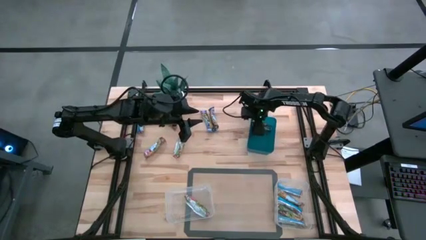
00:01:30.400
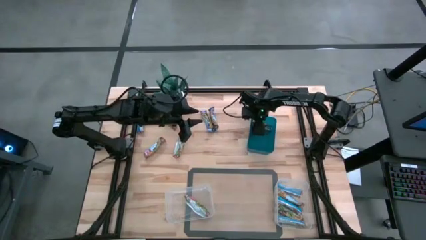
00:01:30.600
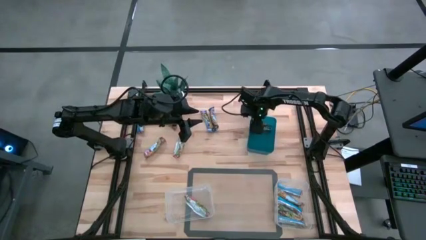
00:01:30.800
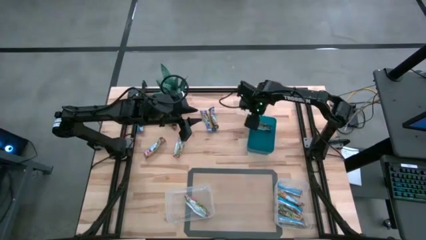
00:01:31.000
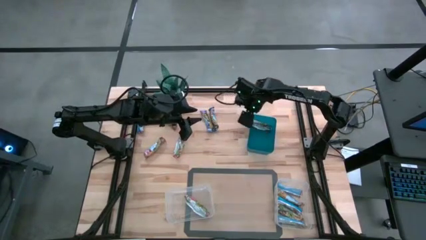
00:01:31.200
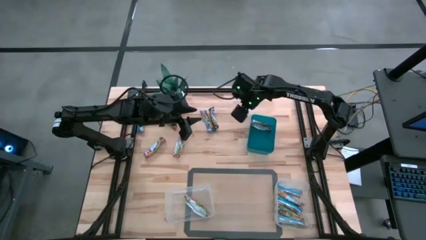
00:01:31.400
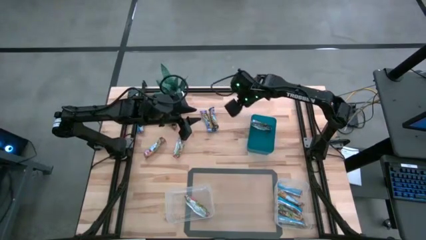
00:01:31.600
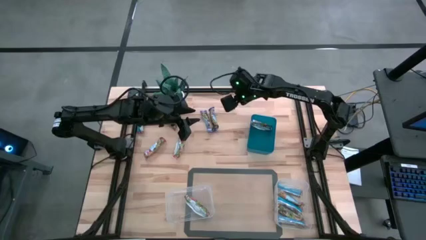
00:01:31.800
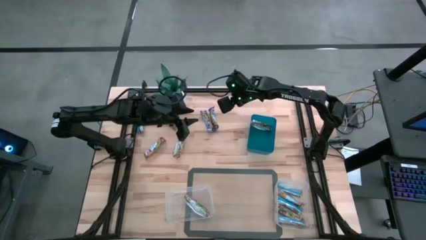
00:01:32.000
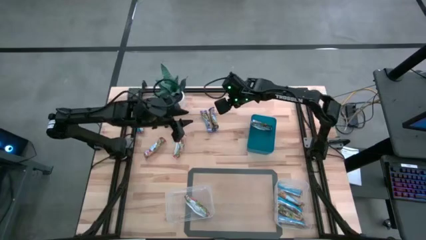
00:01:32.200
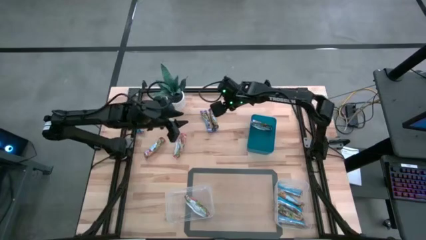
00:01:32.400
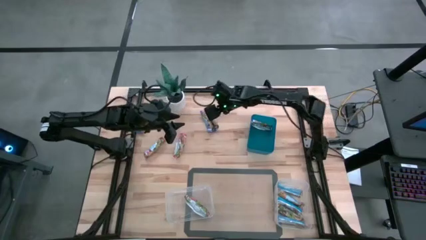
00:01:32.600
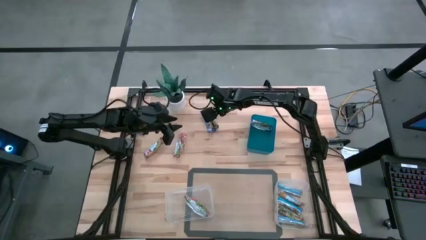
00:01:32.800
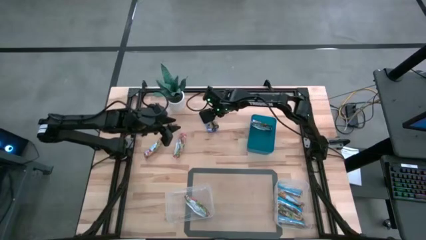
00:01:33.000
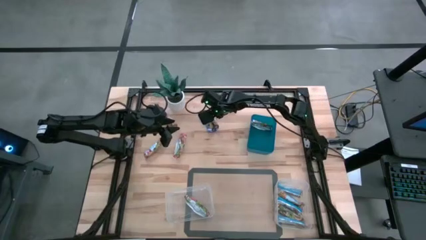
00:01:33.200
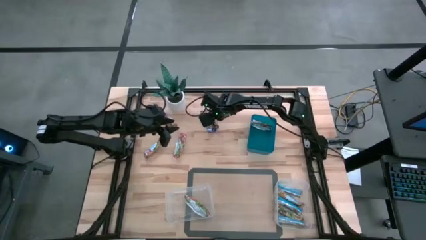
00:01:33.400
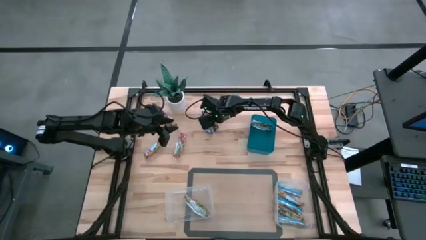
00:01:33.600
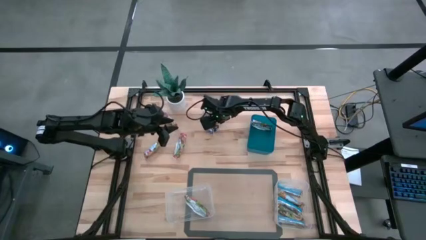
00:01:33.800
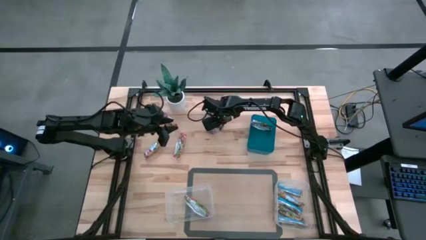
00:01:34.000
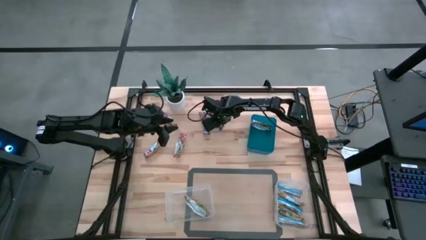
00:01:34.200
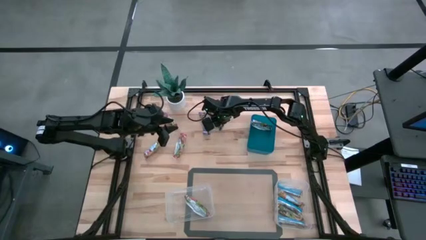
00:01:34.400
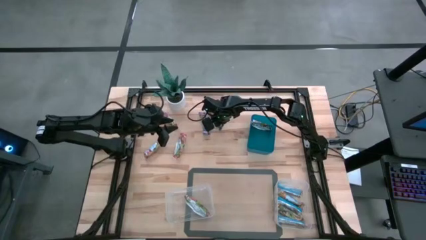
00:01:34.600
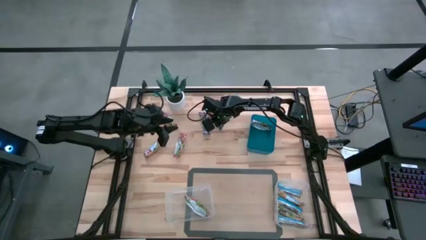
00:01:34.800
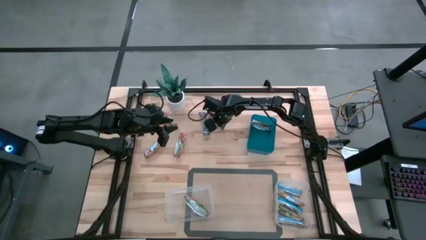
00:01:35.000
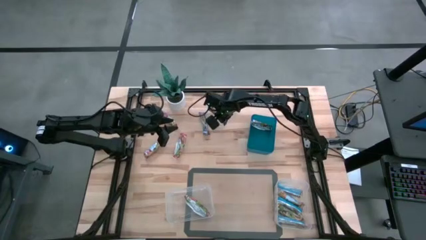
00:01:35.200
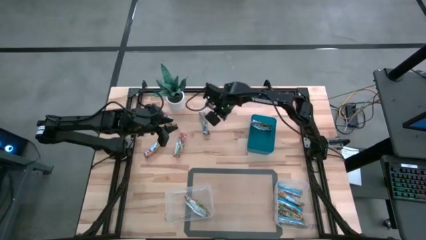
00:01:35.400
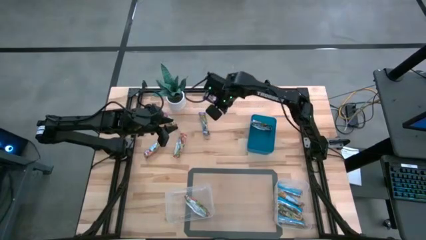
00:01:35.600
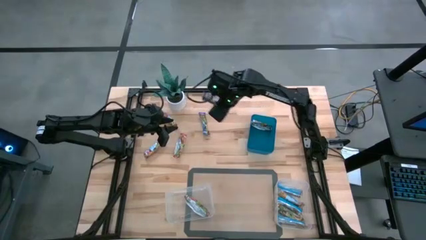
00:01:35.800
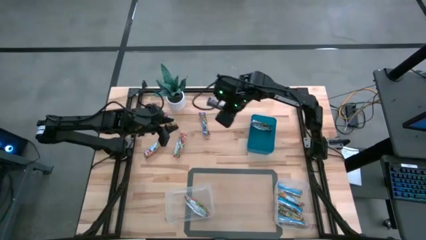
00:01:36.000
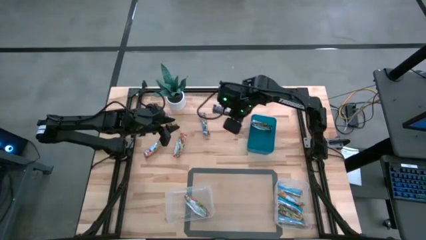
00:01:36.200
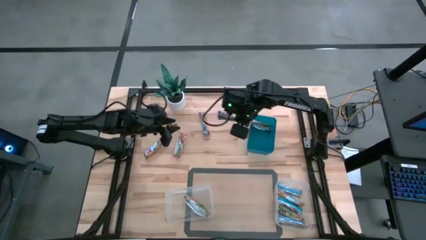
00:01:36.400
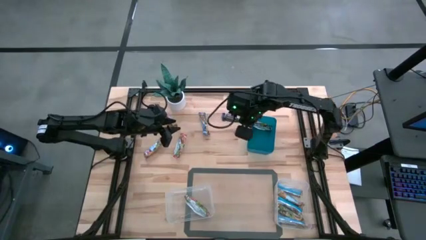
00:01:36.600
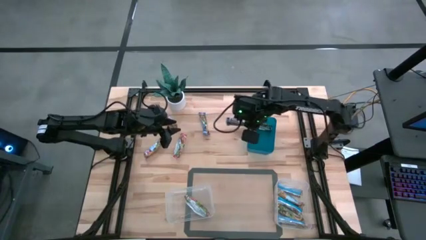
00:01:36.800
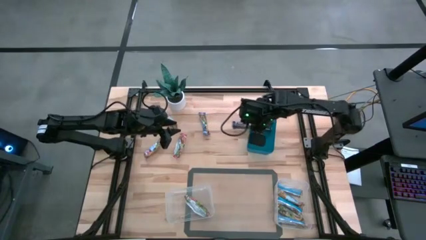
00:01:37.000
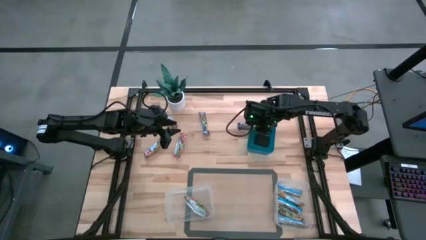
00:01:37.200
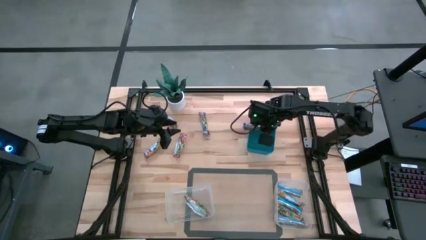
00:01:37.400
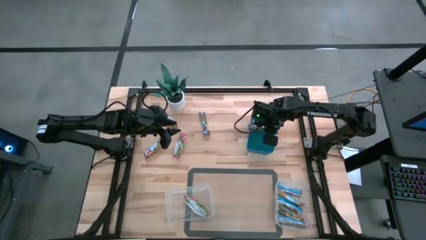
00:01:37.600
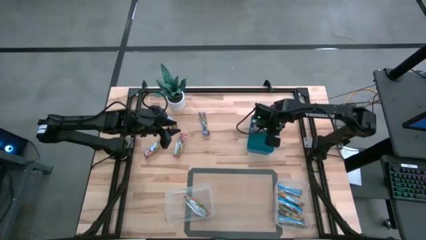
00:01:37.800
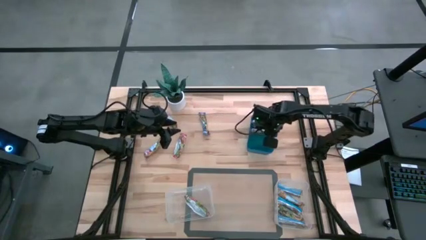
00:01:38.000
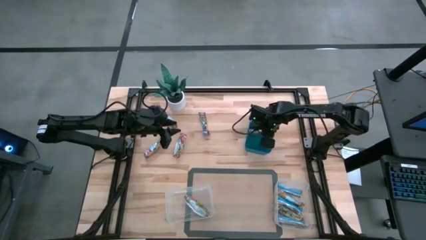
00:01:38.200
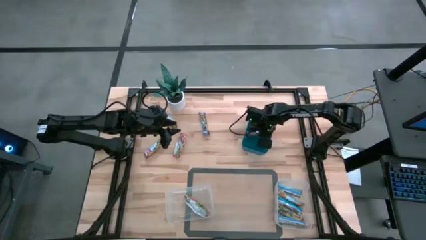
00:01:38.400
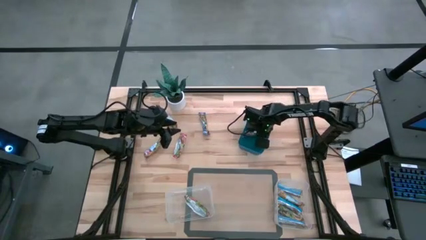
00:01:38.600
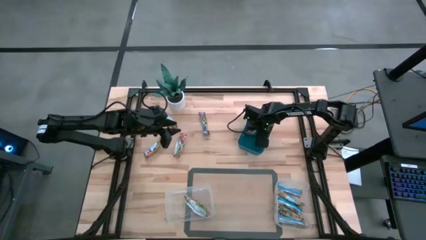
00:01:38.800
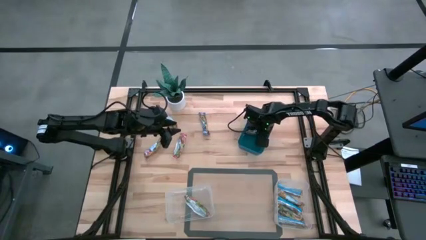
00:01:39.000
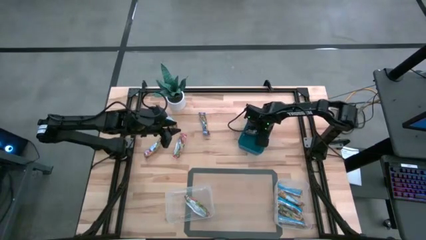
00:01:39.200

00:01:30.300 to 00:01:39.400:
Task: Pick and place Granola Bars by type
Put the right blue granola bar into the blue bin

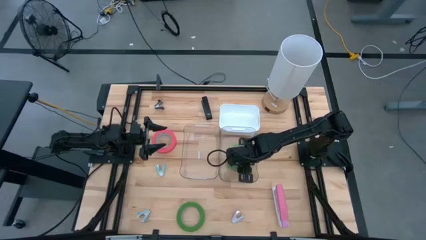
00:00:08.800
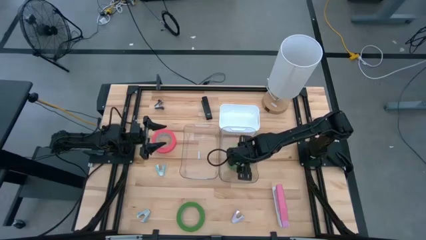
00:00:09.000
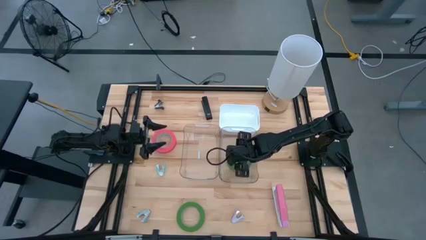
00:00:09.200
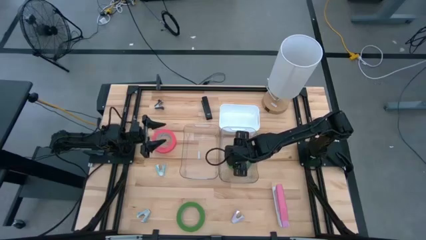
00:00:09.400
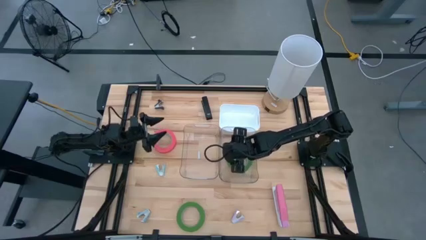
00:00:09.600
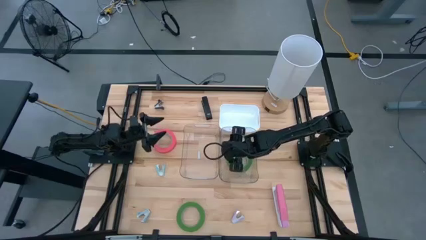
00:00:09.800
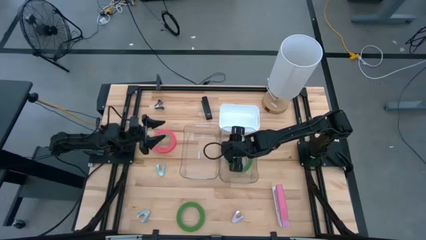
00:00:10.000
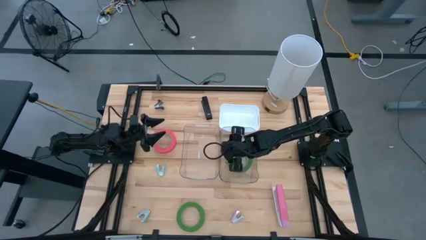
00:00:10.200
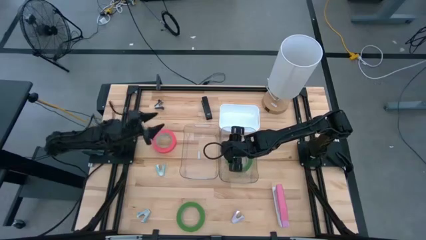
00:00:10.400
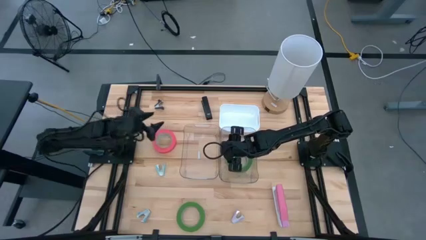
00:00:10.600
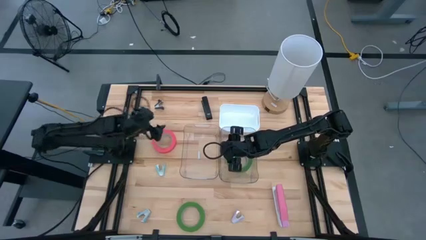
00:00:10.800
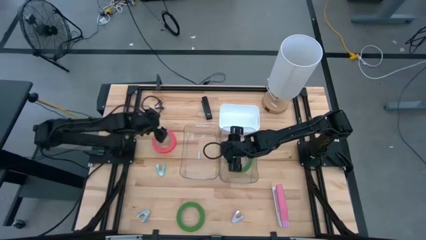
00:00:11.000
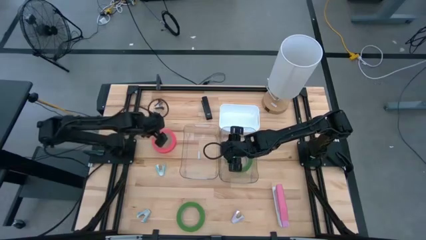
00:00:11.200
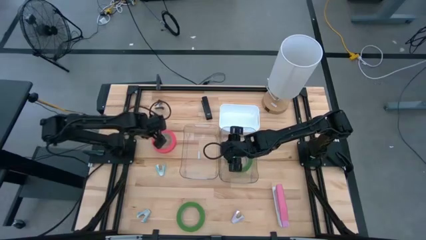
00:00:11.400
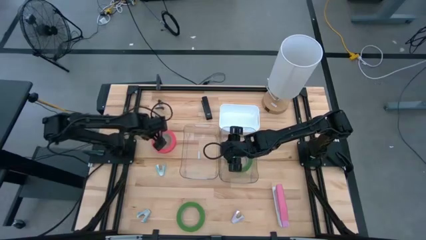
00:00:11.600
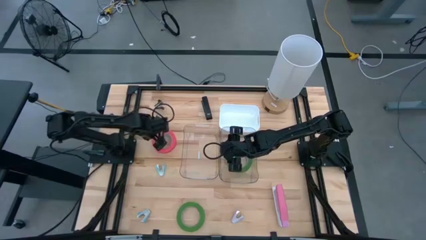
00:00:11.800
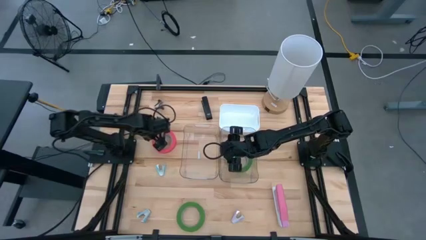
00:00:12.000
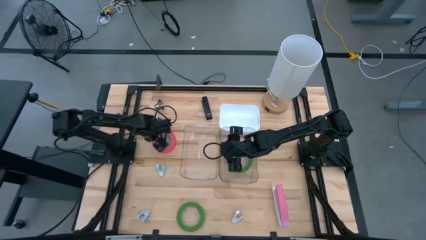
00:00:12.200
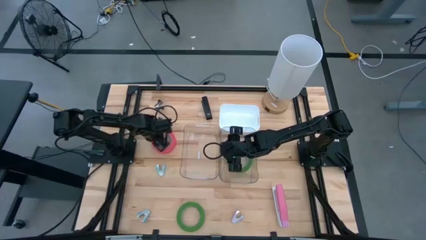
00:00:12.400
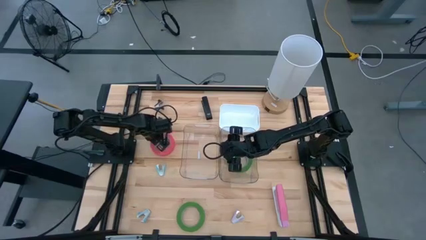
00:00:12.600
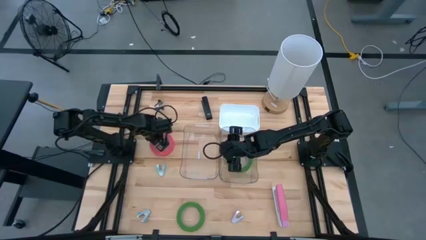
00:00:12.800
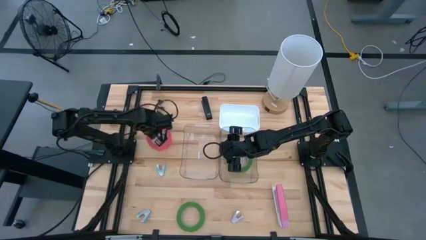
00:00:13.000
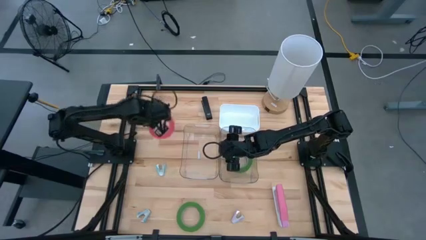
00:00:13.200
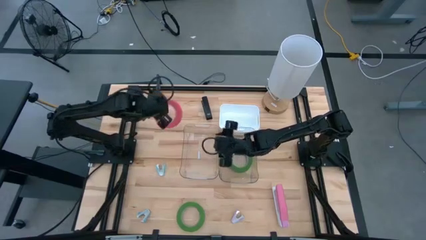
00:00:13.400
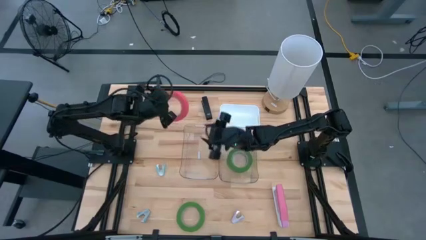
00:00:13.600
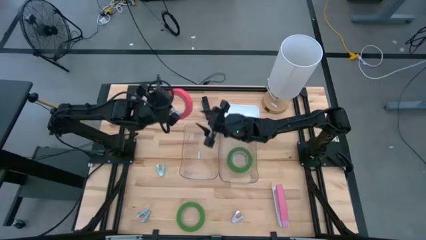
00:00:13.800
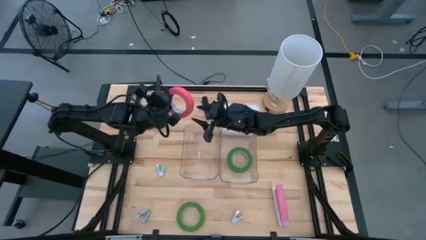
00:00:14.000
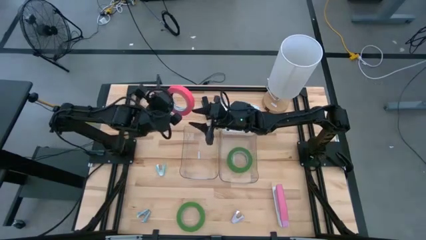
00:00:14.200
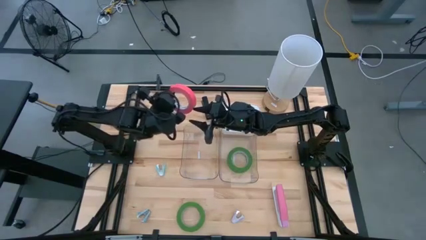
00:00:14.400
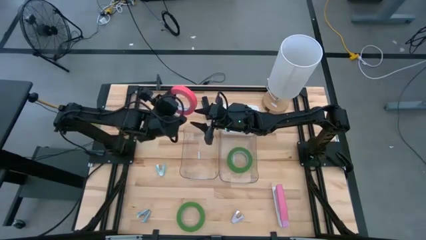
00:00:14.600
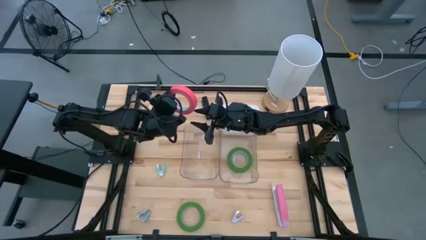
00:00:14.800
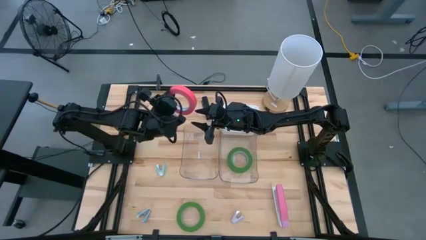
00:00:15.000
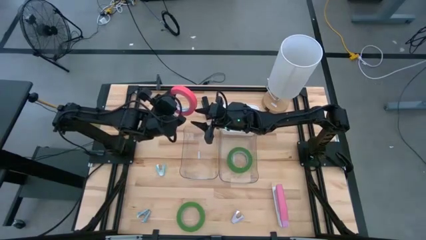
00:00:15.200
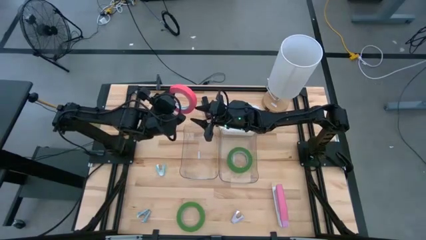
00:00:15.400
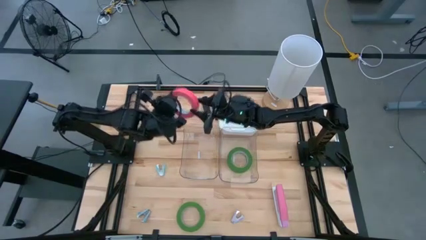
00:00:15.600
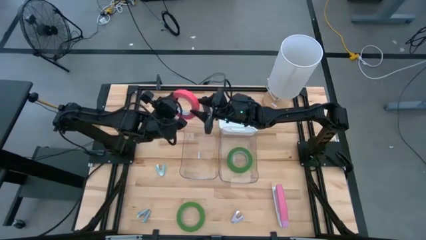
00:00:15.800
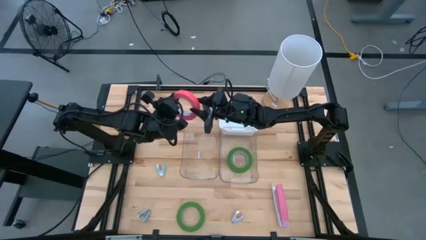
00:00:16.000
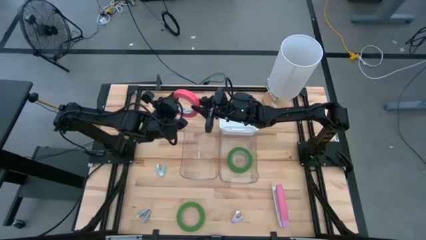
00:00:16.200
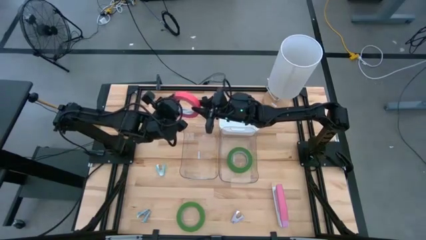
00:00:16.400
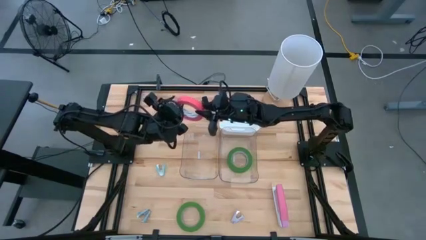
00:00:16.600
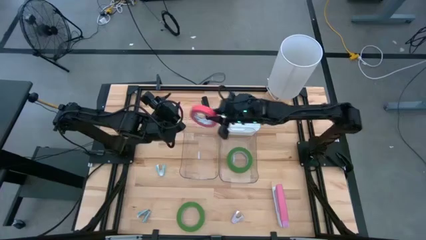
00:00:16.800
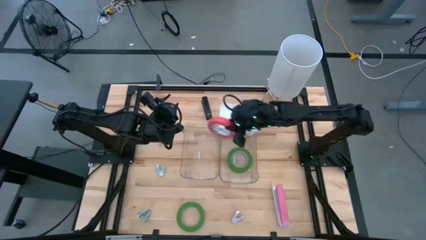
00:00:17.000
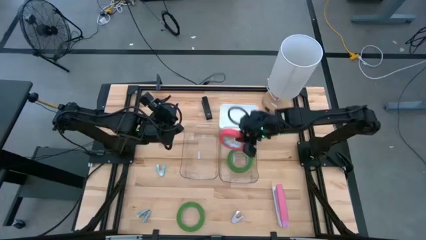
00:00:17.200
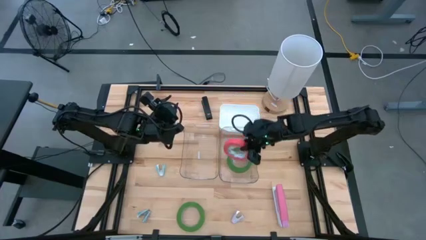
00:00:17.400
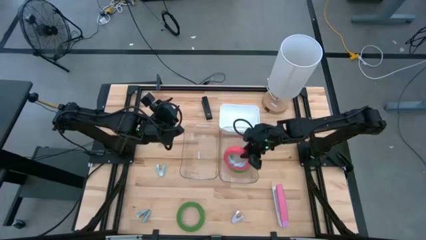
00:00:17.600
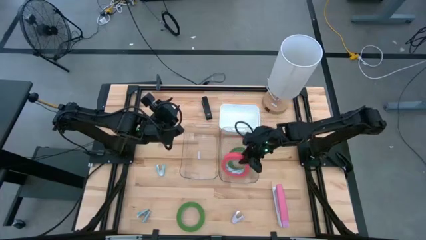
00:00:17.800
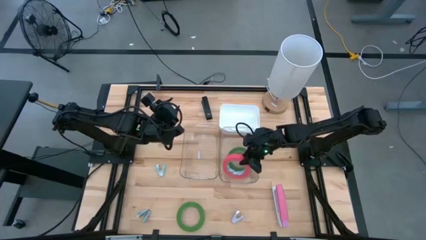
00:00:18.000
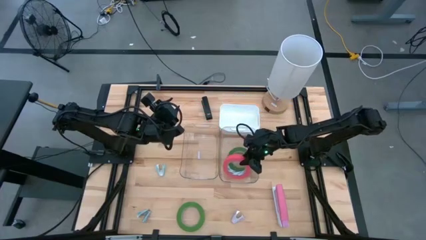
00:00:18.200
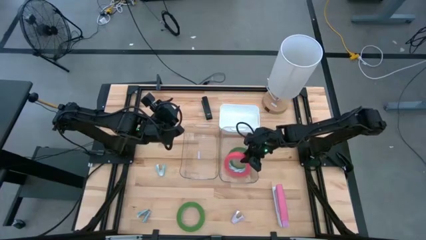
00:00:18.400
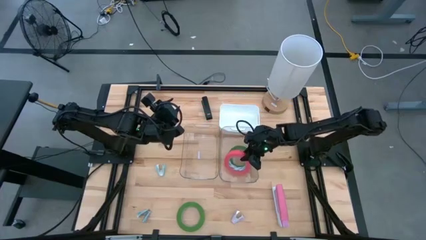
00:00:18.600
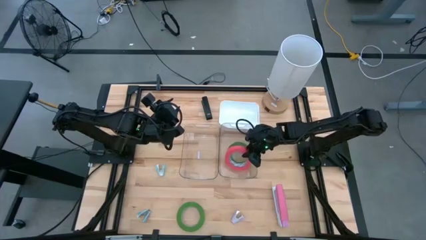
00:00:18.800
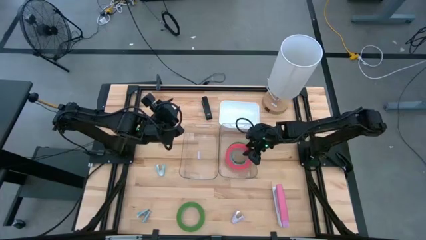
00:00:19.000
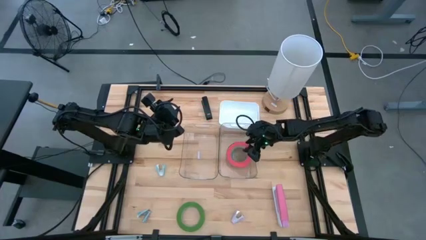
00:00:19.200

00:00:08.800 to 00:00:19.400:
Task: Pick and place Stapler, Stapler remover, tape
Put the pink tape into the right transparent bin
